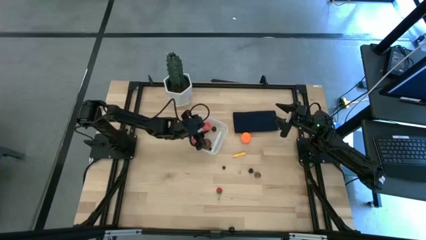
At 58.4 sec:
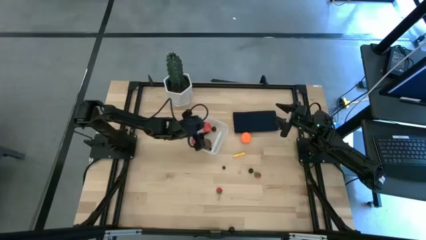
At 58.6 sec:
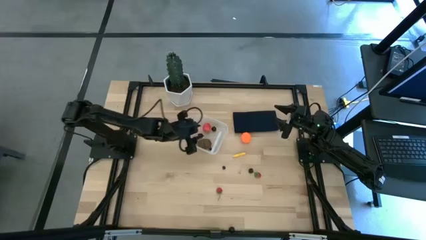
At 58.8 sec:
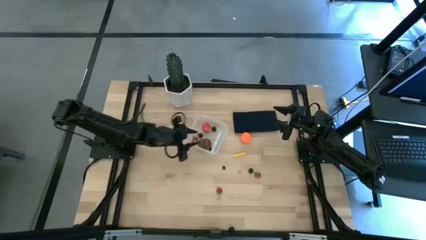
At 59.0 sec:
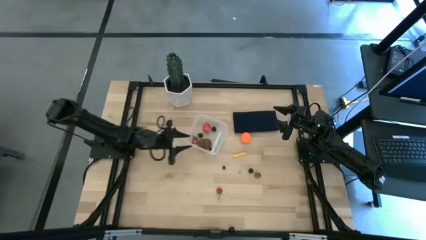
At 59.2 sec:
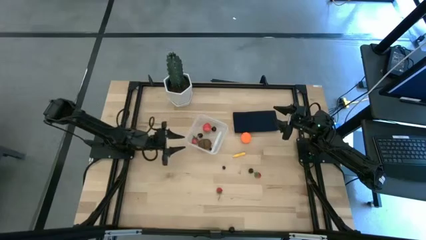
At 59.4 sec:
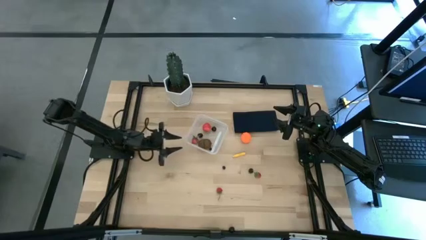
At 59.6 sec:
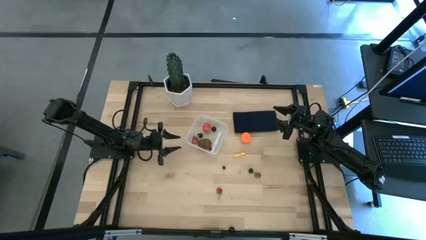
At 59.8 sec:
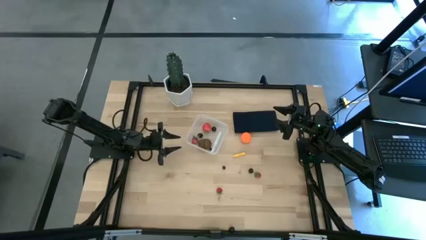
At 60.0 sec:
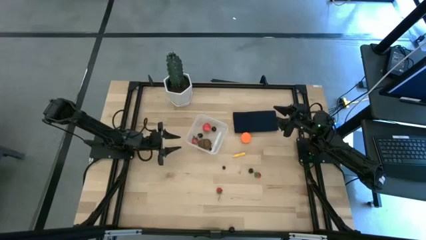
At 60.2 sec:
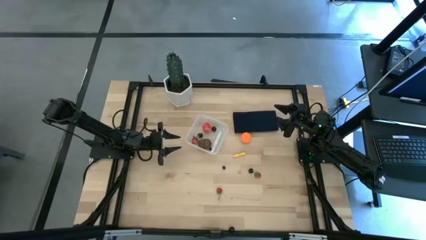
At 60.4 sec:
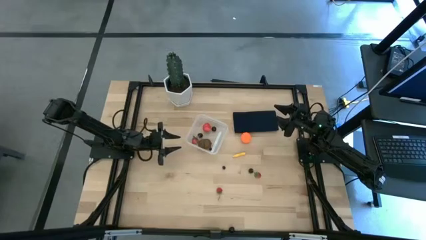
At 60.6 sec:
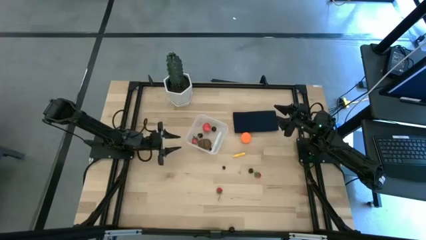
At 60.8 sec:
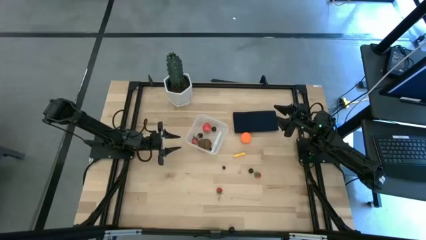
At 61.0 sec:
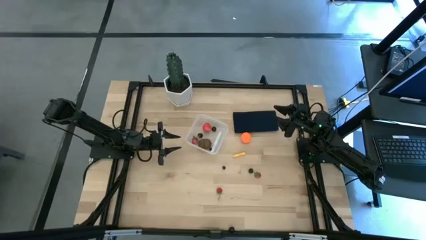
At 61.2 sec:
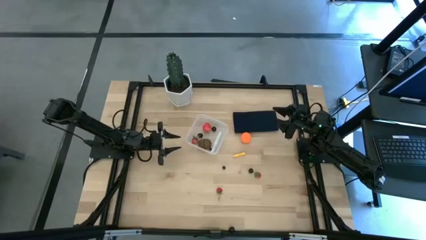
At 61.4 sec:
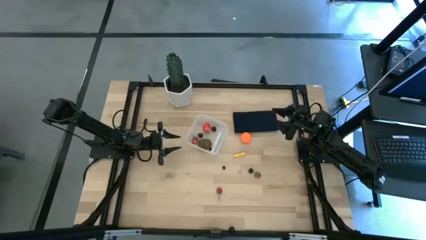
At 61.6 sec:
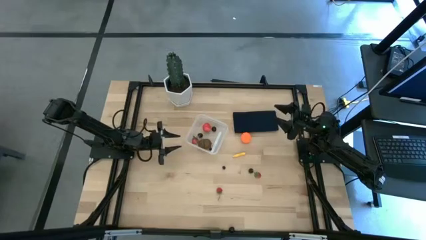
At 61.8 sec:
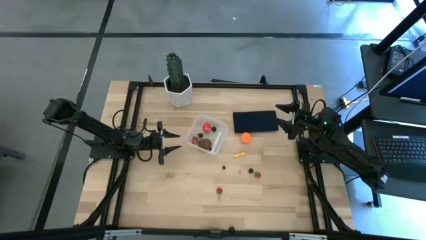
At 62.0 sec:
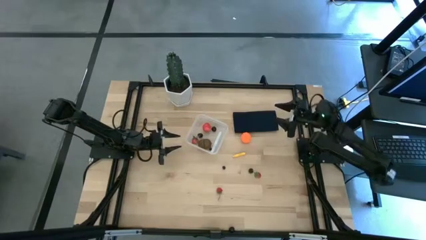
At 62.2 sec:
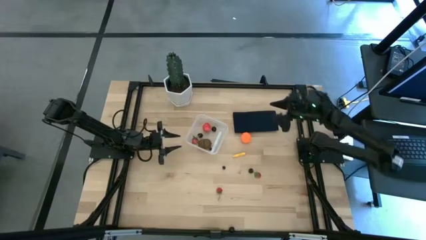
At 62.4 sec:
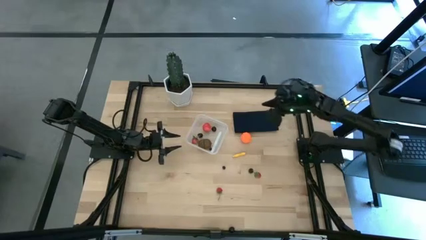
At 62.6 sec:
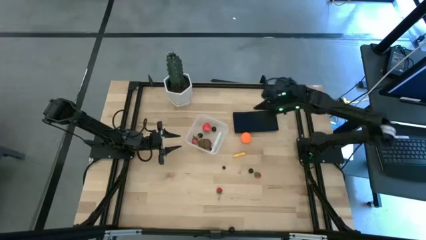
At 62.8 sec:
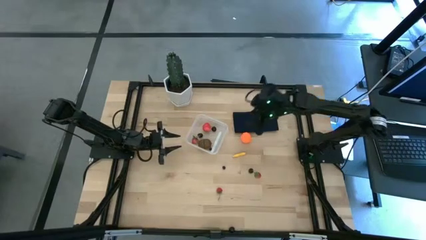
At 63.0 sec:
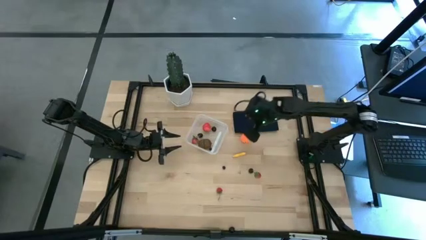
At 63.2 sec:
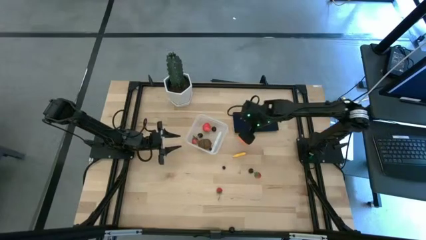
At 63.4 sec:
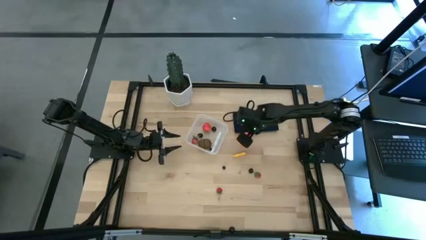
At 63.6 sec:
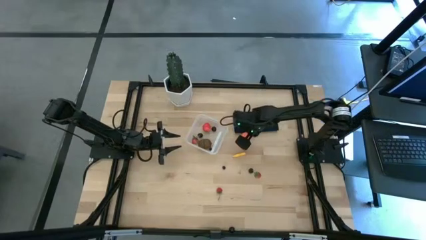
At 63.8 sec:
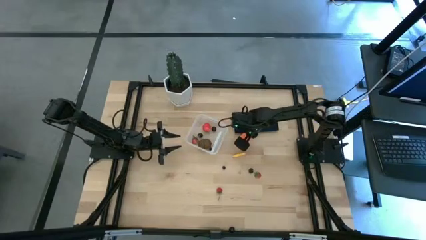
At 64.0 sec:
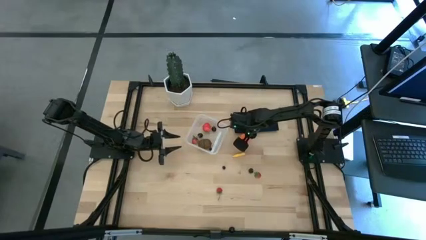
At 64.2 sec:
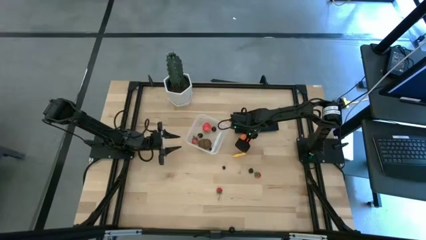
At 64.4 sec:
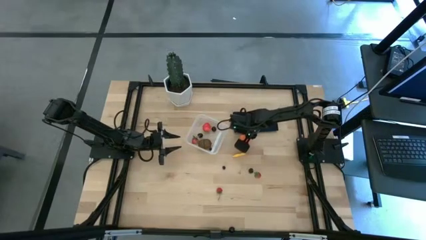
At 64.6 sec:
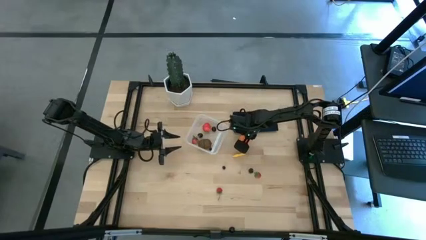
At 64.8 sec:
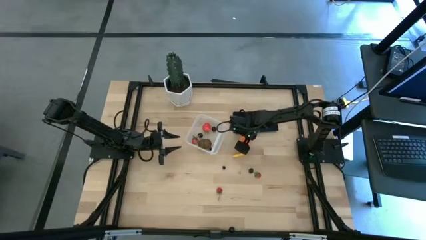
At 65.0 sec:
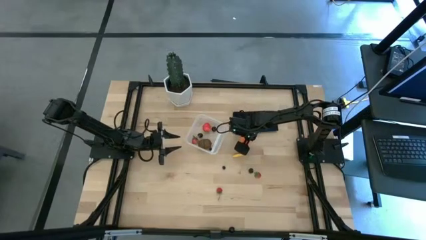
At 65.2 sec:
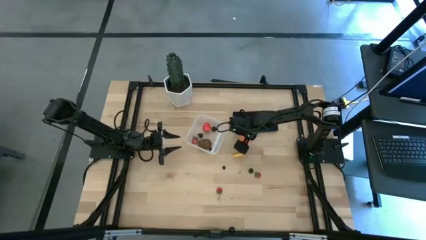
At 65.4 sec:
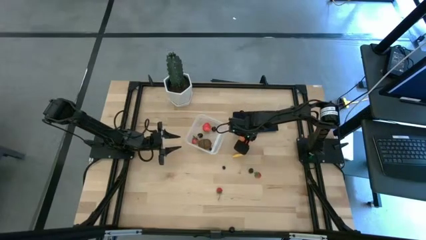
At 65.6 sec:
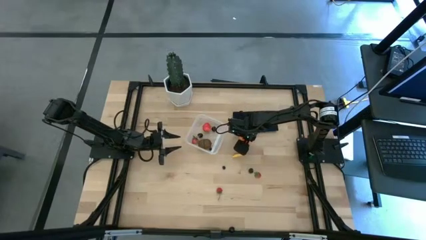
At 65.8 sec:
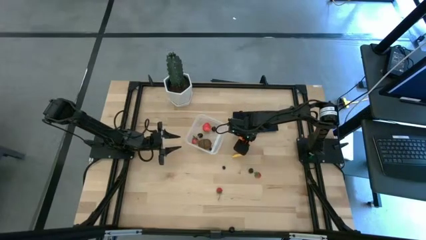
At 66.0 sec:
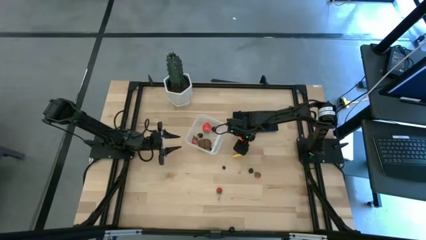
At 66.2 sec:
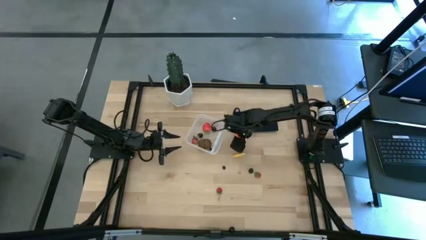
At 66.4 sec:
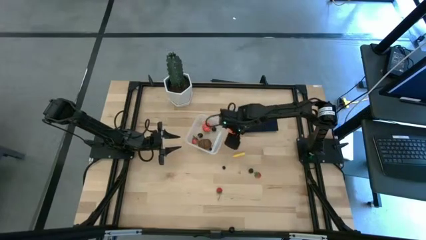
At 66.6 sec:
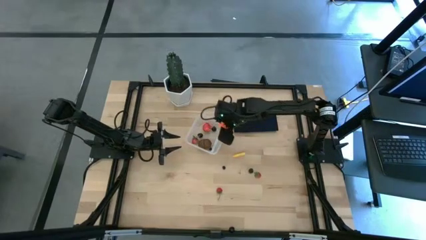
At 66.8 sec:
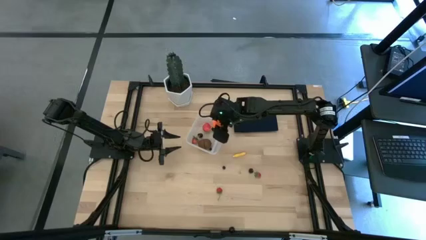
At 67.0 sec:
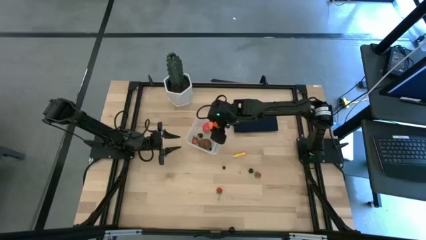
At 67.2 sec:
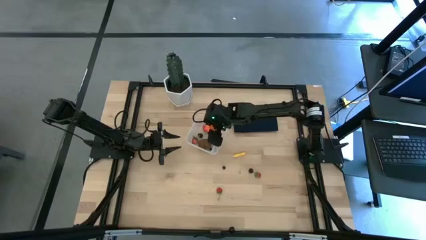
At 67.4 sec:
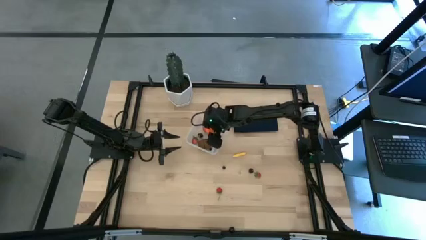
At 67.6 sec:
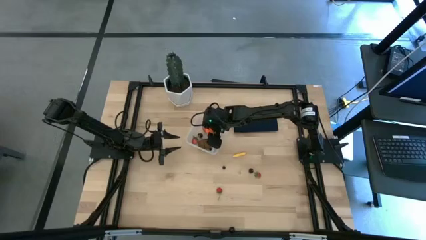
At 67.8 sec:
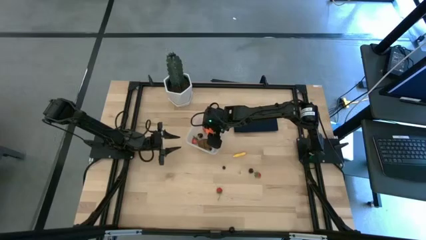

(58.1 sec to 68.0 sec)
Task: Pick and placing Produce into tupperware
Put the orange pumpkin into the transparent container

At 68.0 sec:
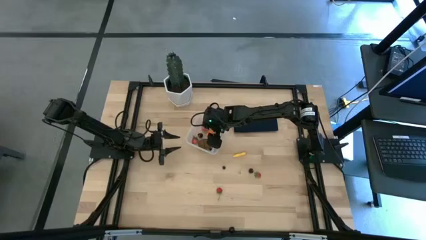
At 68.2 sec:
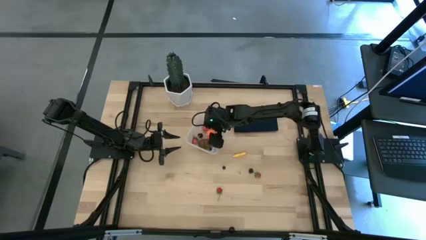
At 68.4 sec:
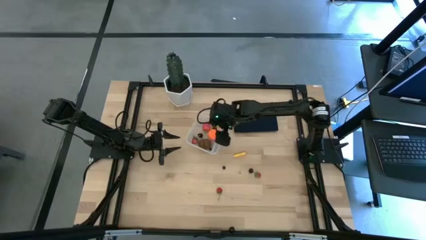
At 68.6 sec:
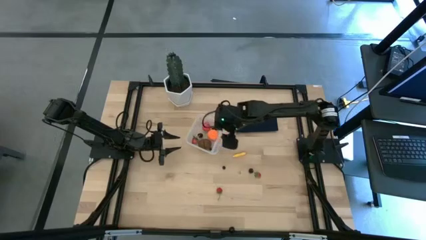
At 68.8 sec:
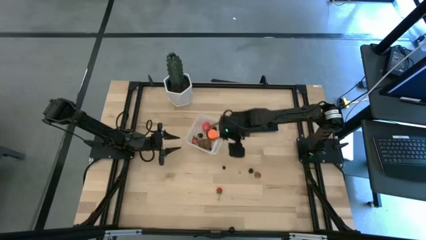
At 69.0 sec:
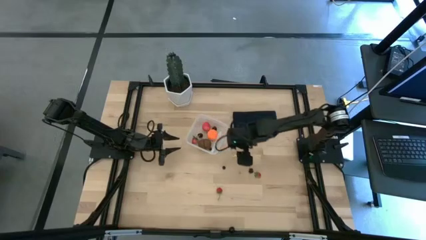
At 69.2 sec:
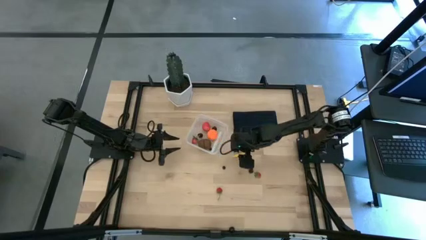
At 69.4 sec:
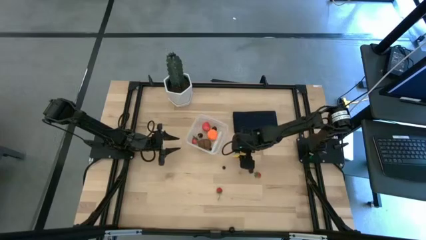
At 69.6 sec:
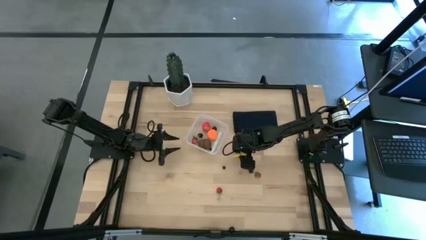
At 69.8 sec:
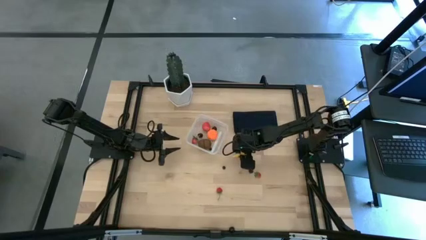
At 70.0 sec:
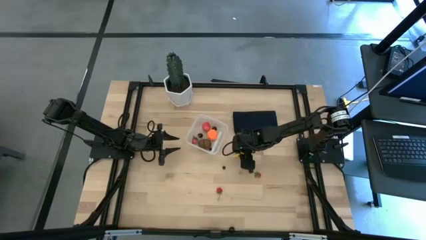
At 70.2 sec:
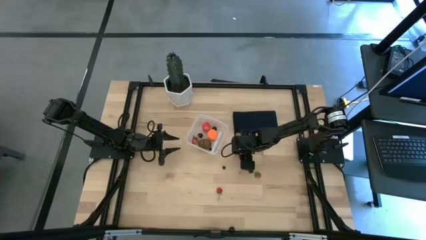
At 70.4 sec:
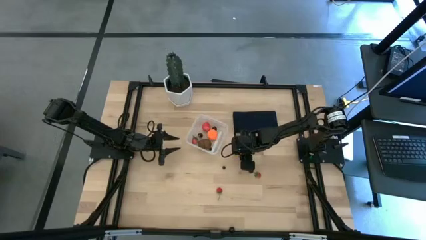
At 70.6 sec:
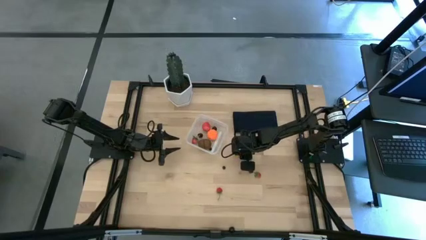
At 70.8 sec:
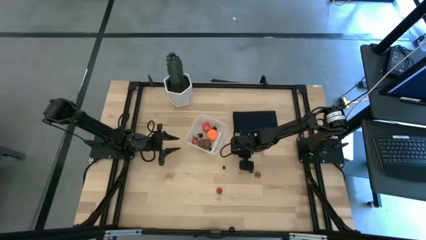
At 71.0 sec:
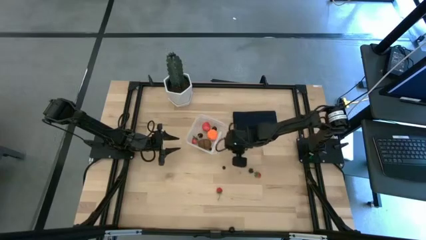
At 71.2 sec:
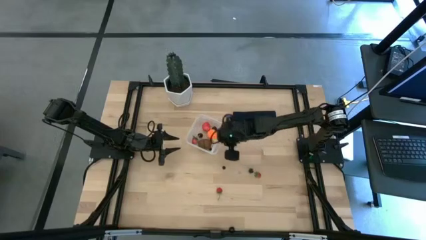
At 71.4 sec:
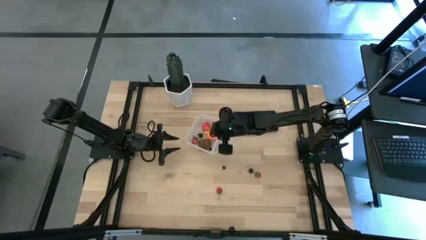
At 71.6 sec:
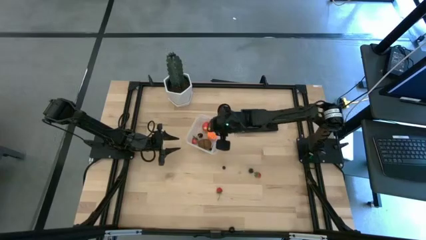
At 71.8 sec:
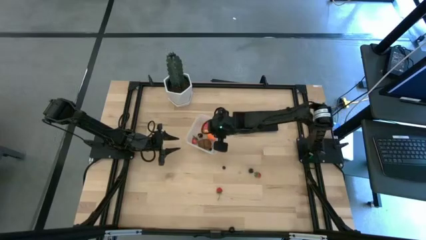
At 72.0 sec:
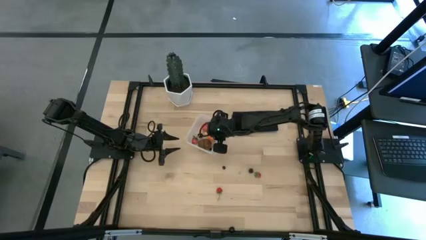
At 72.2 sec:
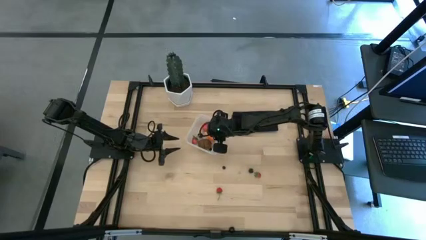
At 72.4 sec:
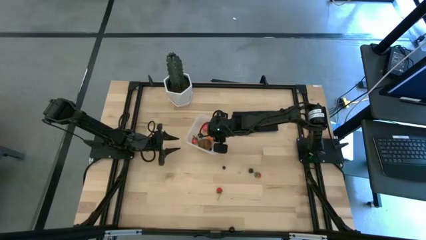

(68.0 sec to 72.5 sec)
Put the yellow corn into the transparent container

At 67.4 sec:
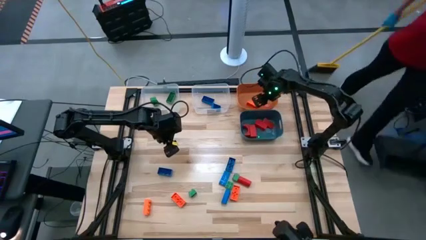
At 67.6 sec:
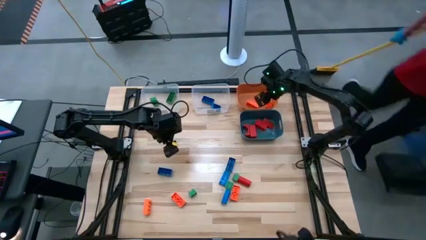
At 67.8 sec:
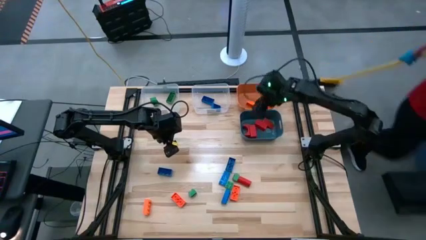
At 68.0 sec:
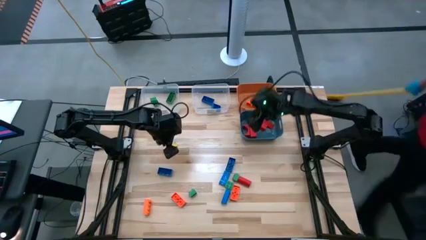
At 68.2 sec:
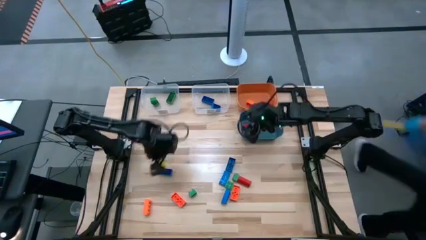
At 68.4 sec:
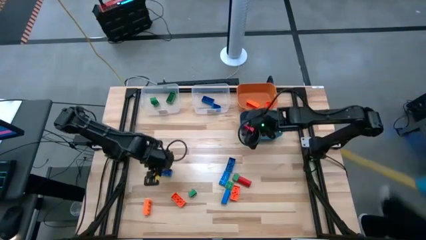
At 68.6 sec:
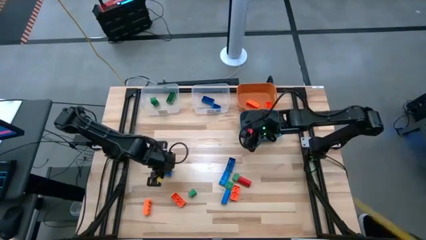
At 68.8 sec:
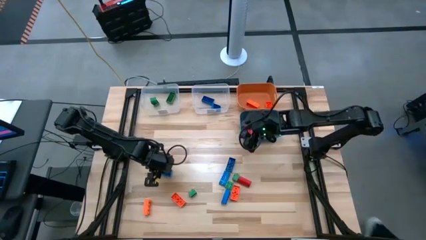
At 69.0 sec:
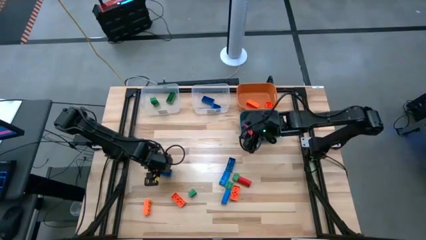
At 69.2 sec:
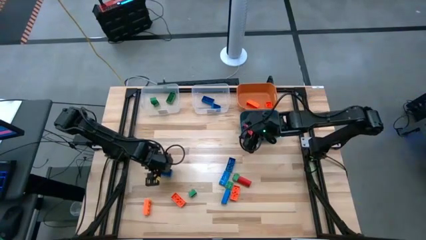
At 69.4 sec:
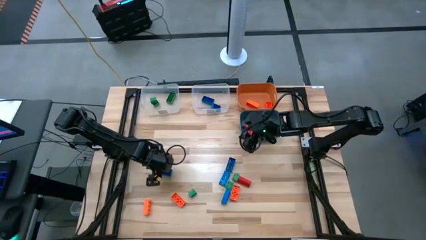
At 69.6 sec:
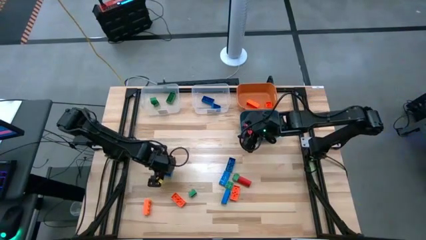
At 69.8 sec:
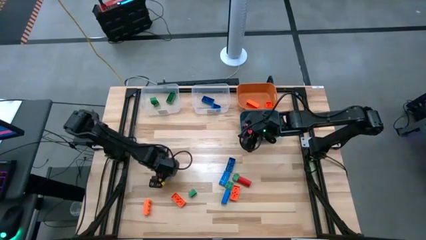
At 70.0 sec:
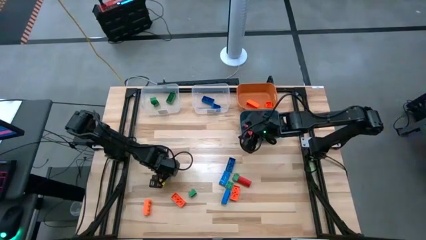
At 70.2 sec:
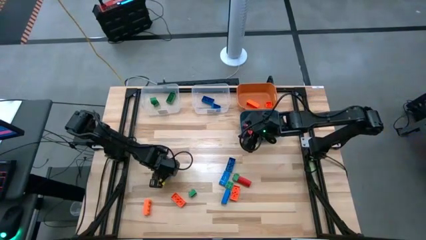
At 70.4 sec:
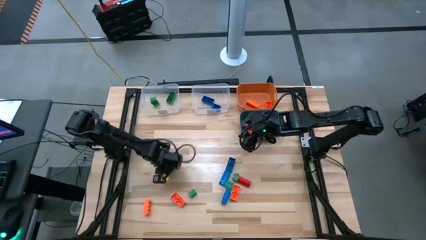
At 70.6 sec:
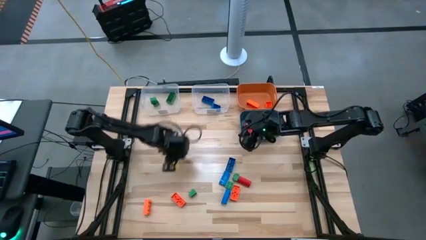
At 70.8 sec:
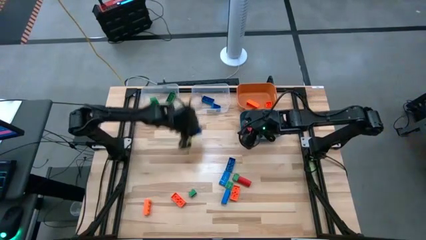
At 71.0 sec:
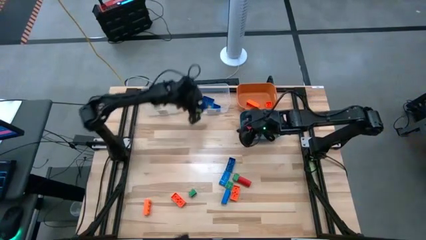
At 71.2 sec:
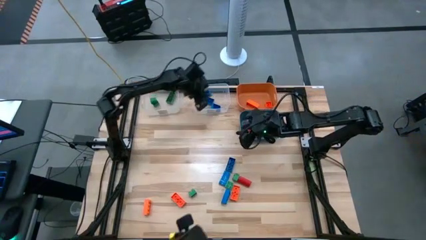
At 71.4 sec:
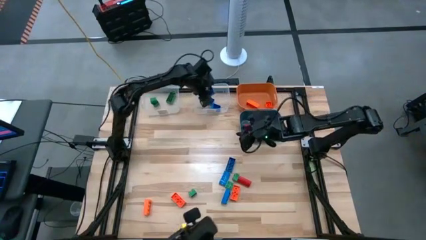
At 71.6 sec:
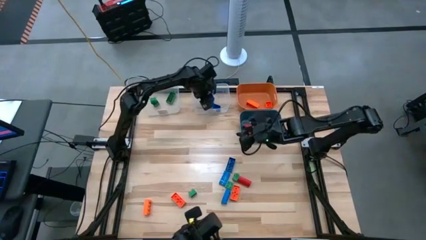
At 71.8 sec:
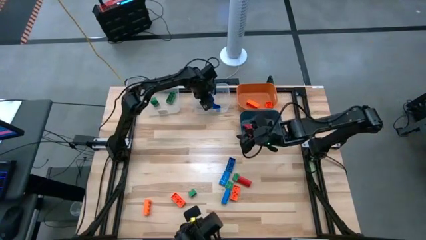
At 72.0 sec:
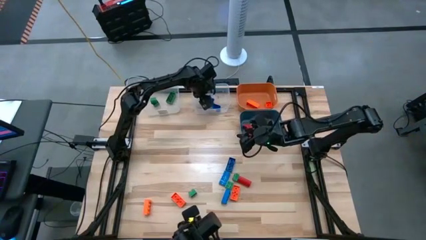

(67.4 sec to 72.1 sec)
Task: Sort blocks
Put the blue game piece into the right transparent bin
